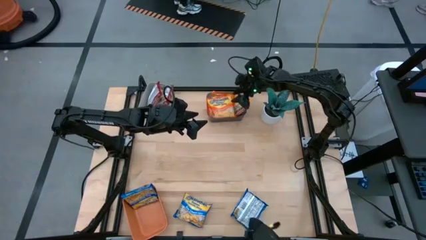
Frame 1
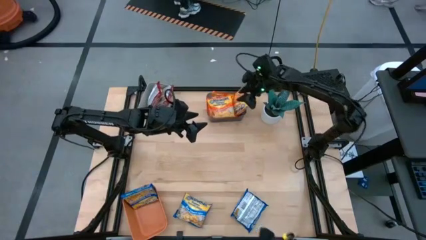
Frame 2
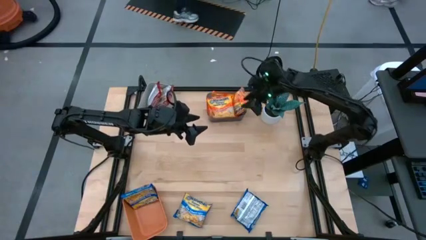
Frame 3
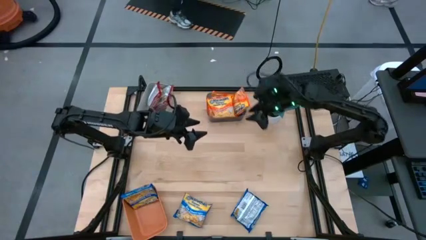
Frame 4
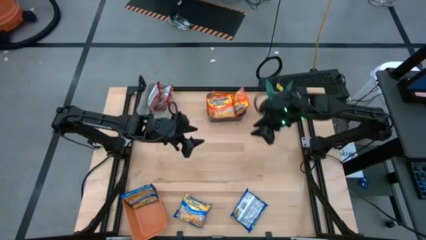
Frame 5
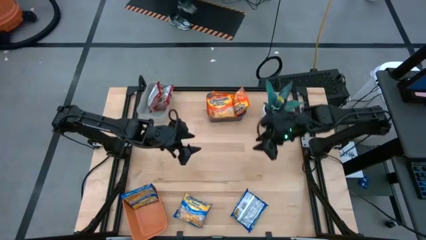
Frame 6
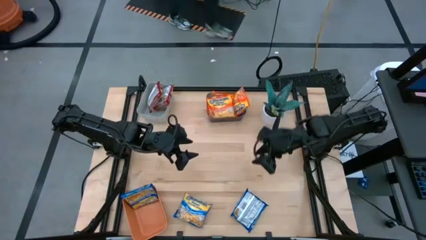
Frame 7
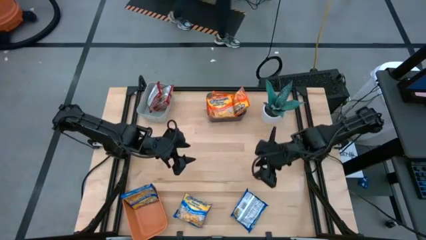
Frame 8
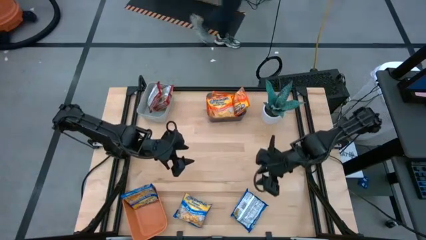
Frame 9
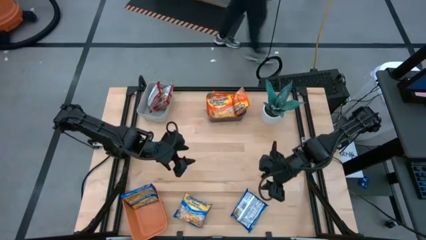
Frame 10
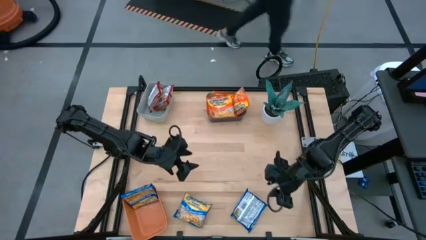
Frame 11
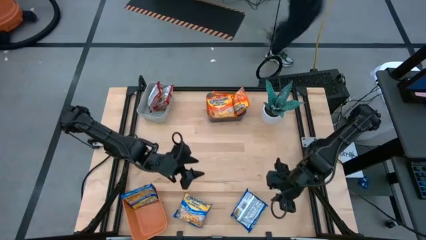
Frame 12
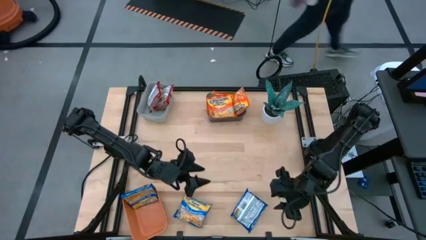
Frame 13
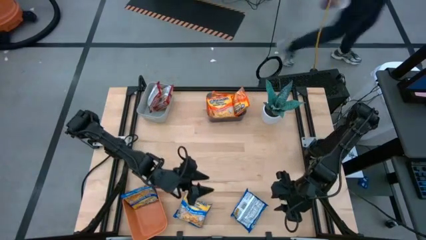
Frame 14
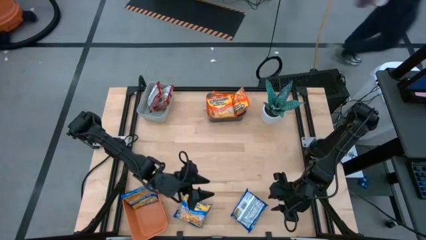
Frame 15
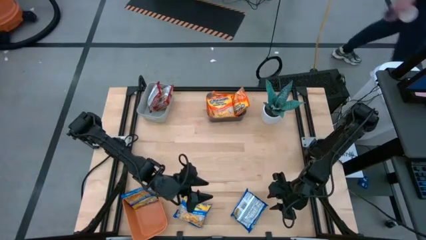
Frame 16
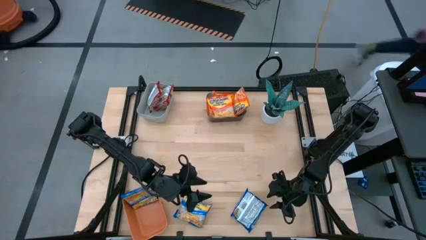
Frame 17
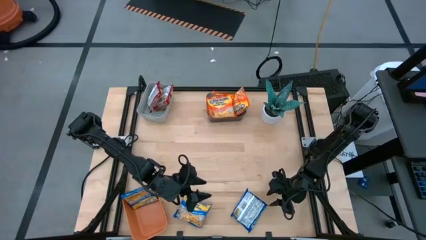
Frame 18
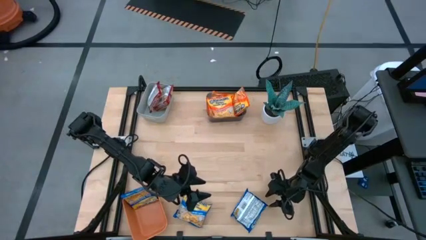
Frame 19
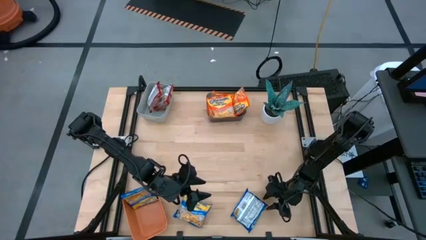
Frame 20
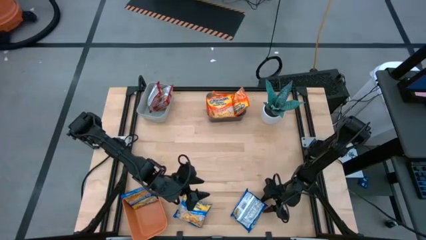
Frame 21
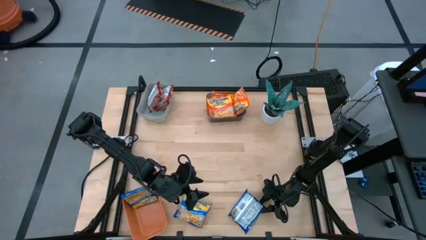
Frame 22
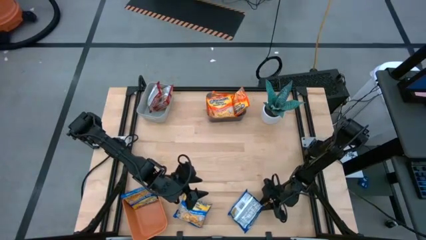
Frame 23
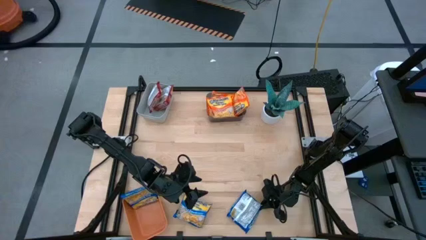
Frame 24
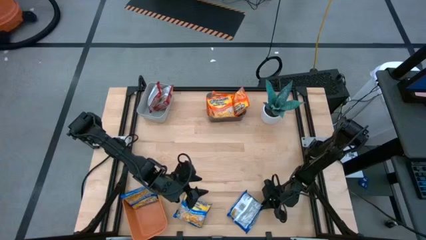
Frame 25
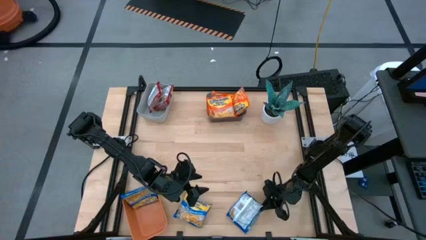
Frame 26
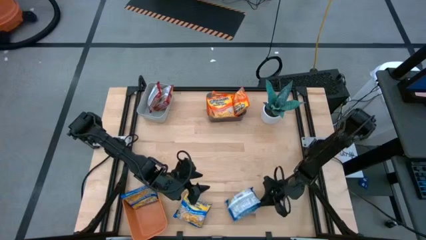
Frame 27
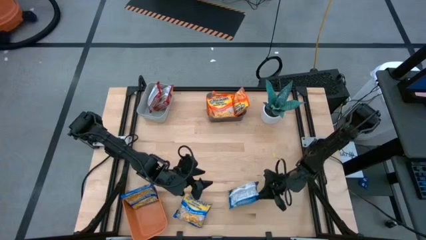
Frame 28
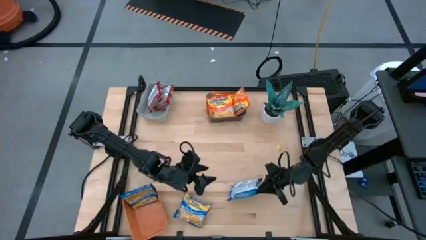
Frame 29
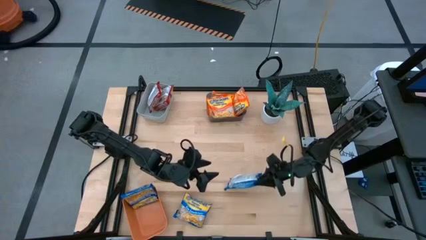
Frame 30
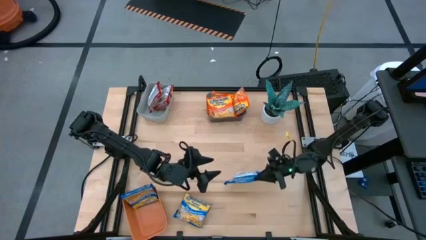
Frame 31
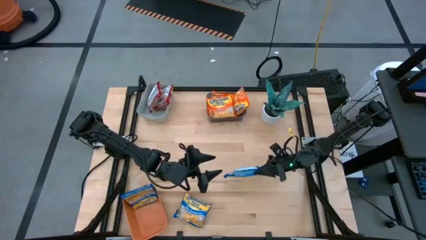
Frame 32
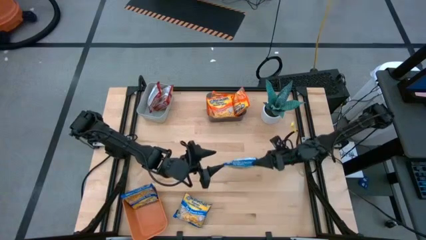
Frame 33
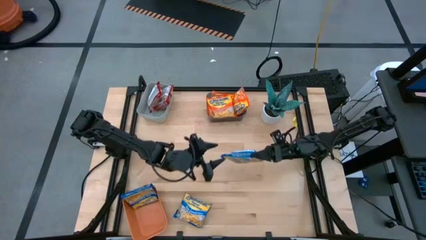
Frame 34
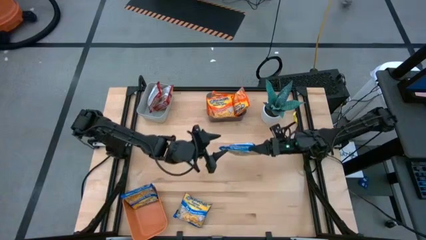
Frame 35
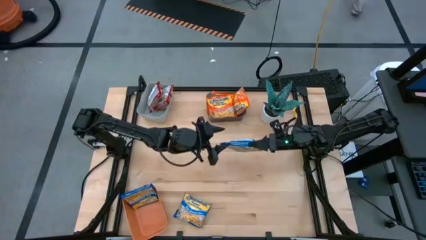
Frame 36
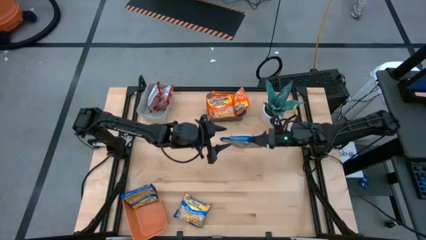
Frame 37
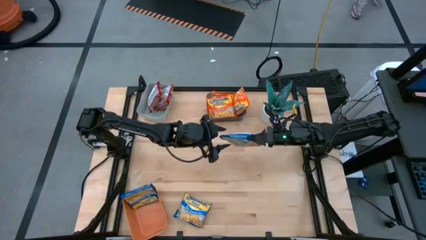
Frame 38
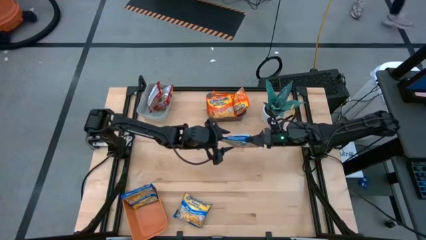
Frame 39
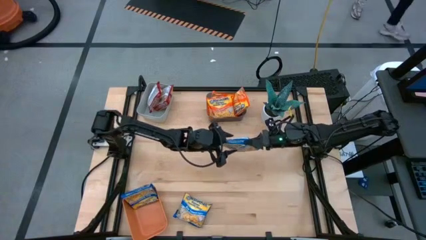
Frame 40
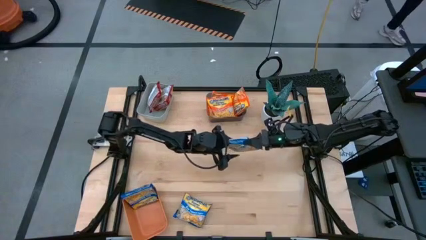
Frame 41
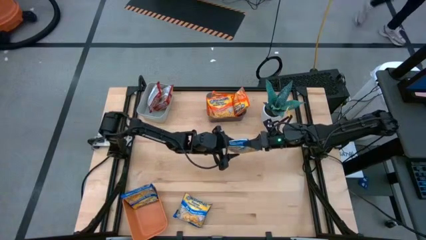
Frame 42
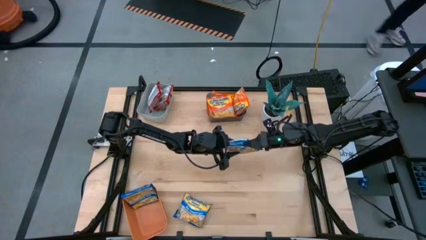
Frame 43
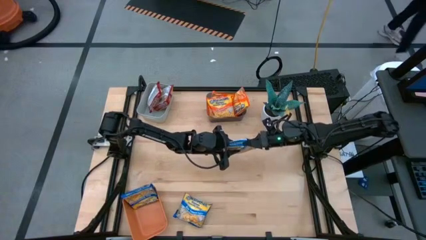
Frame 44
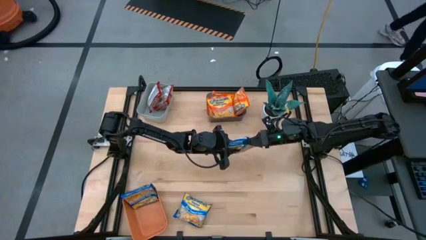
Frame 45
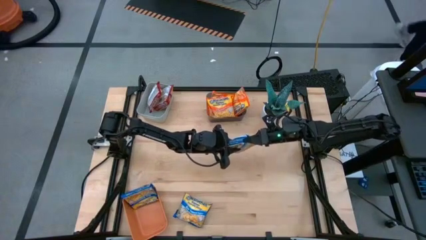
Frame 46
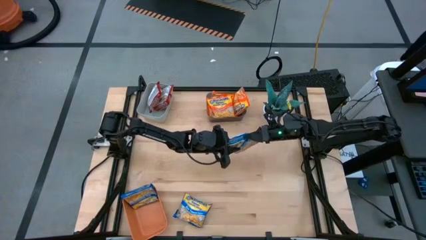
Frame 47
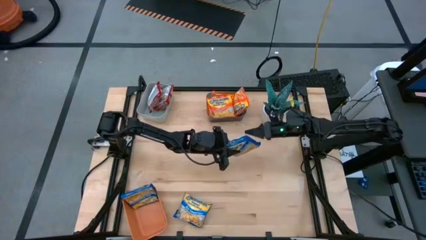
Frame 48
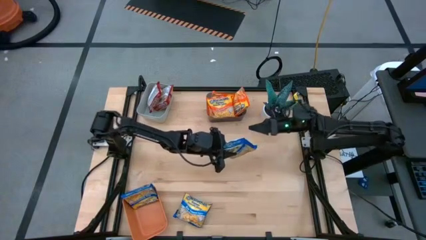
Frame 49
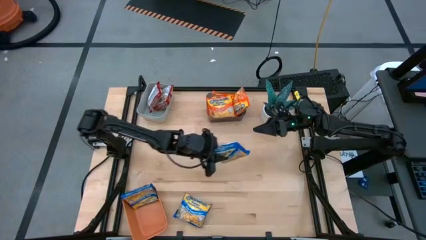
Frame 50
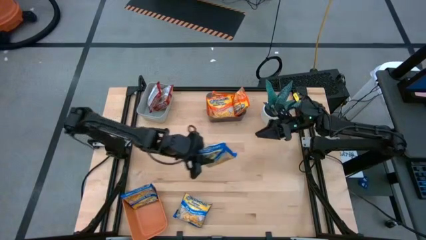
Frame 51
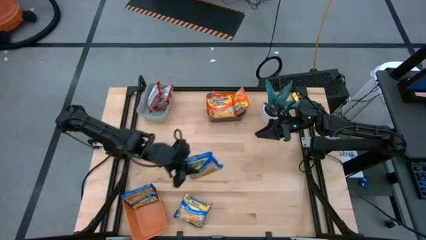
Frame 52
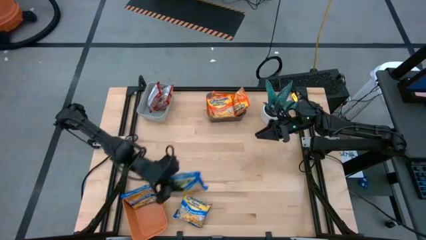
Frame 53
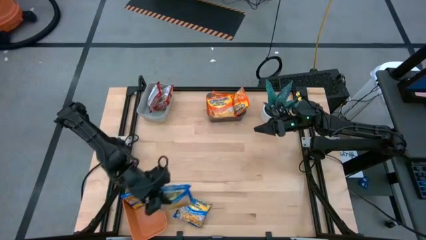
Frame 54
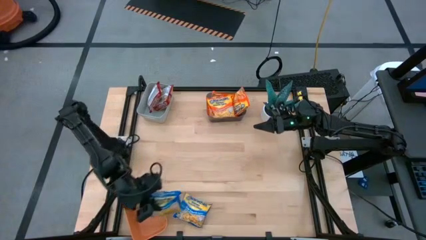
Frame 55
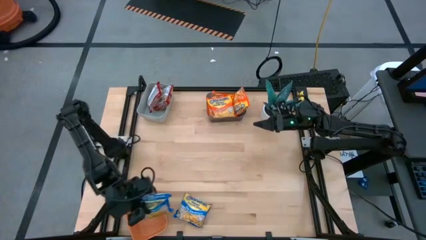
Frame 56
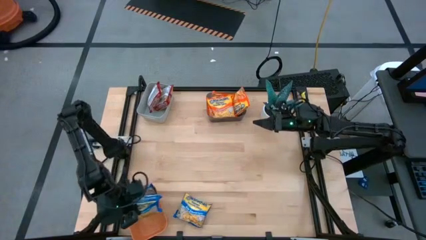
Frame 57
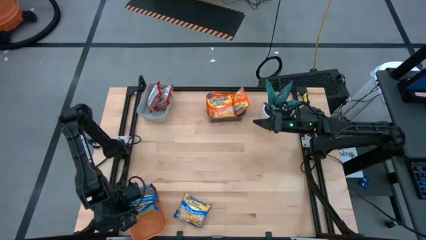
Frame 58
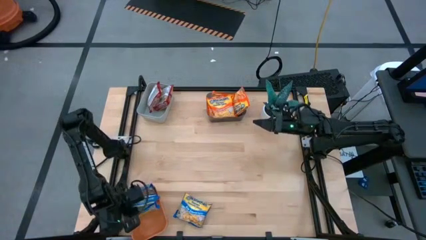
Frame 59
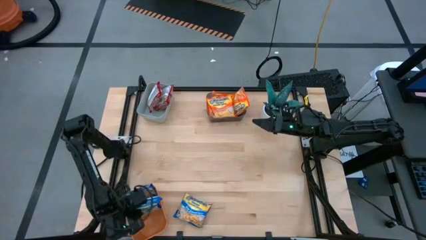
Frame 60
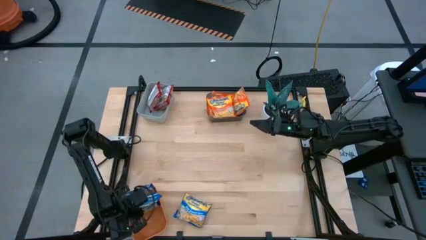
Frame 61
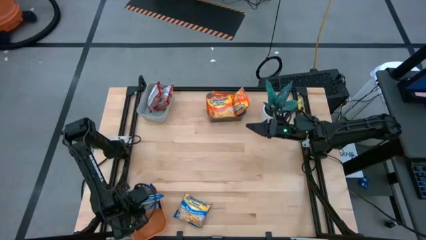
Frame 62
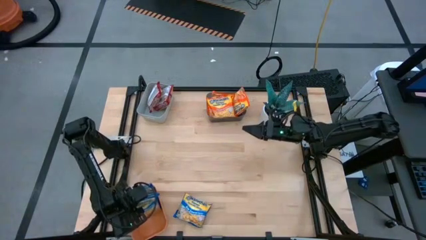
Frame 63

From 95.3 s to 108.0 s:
Task: Sort Maruchan noodles
Put the right blue noodle pack into the orange bin

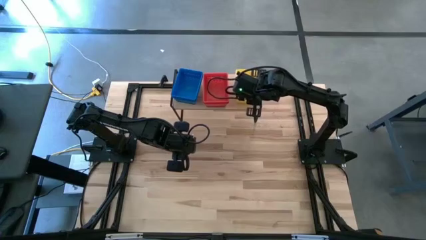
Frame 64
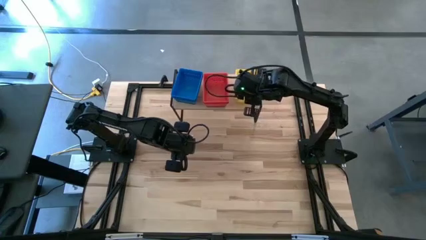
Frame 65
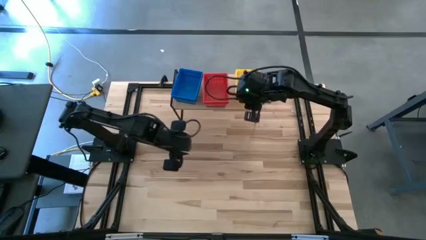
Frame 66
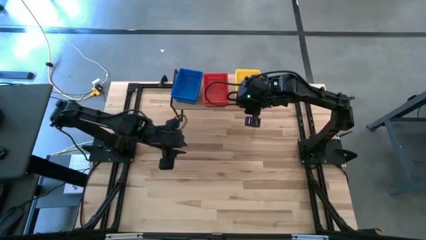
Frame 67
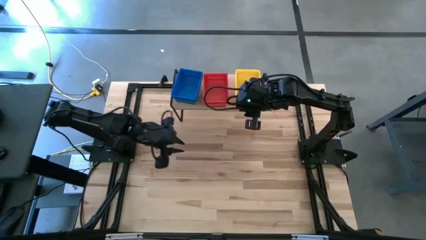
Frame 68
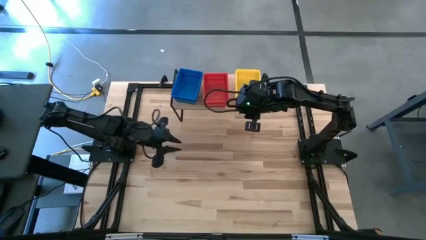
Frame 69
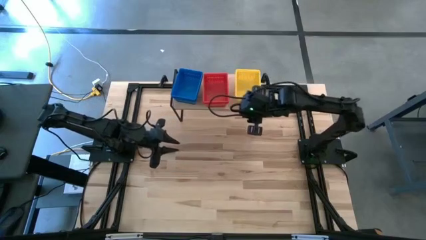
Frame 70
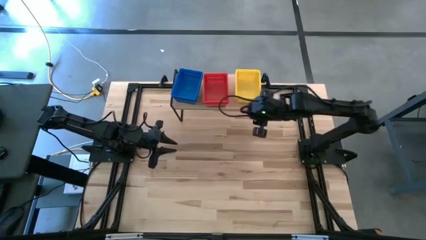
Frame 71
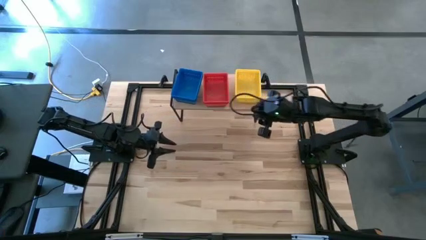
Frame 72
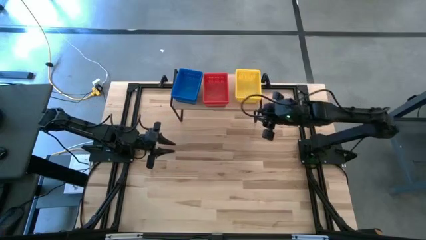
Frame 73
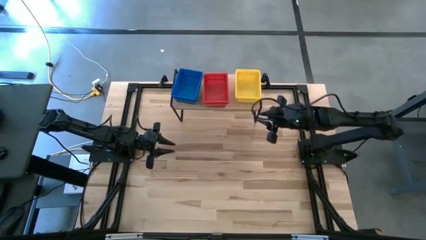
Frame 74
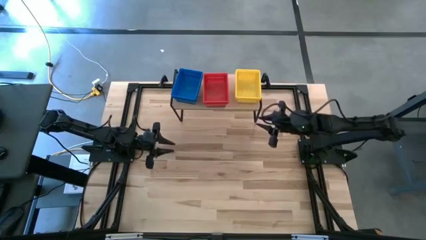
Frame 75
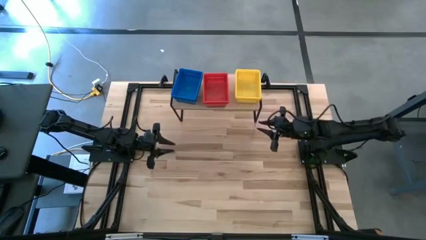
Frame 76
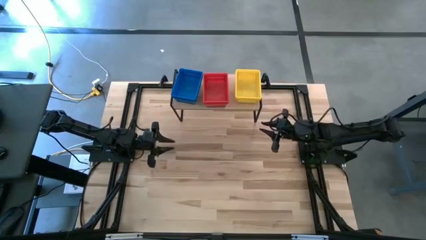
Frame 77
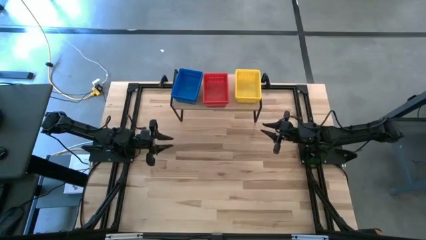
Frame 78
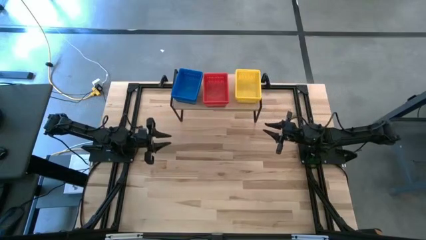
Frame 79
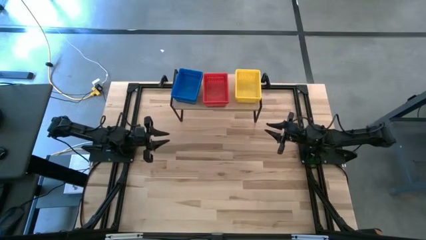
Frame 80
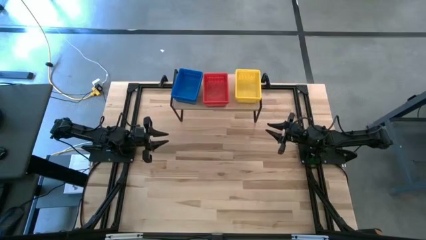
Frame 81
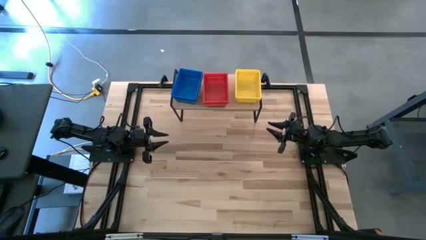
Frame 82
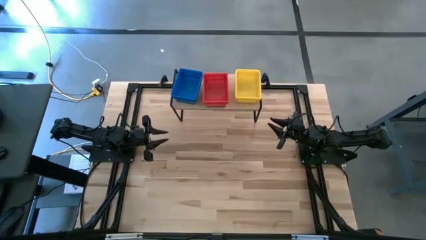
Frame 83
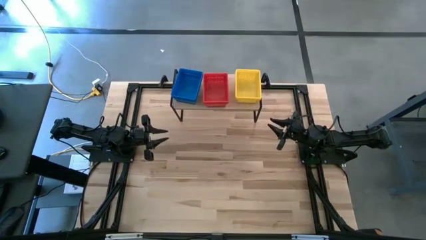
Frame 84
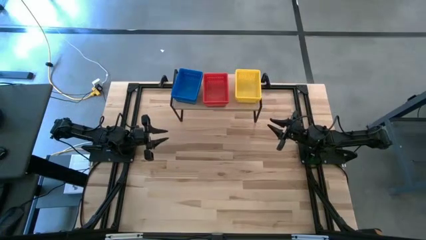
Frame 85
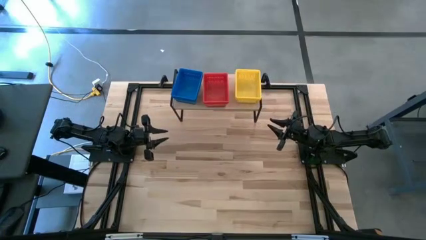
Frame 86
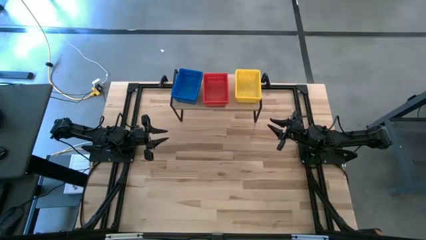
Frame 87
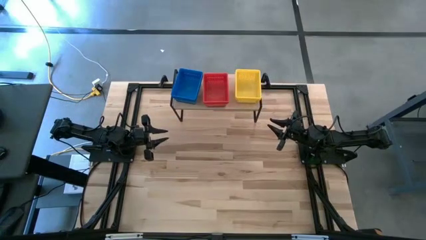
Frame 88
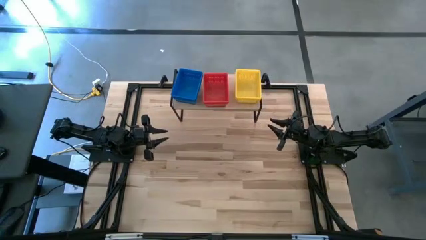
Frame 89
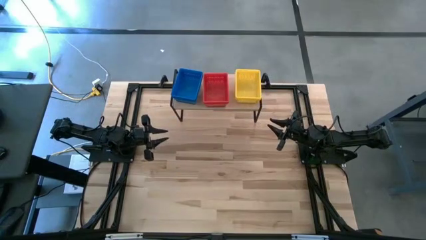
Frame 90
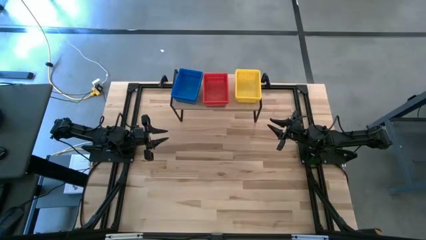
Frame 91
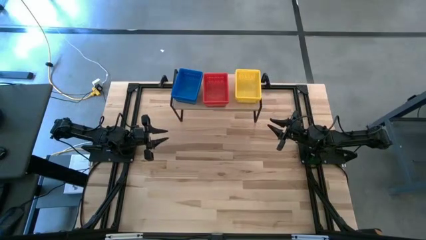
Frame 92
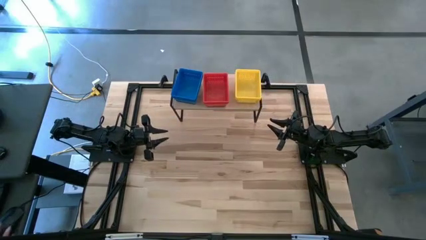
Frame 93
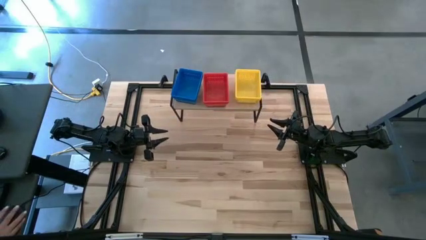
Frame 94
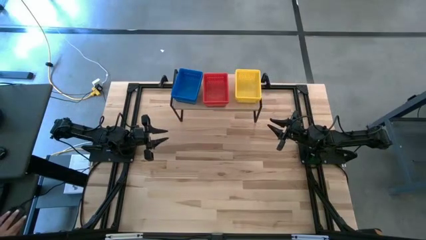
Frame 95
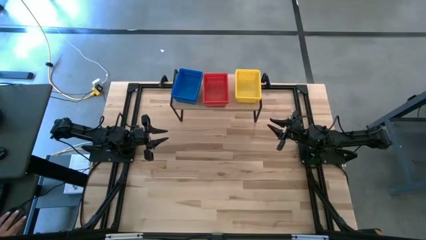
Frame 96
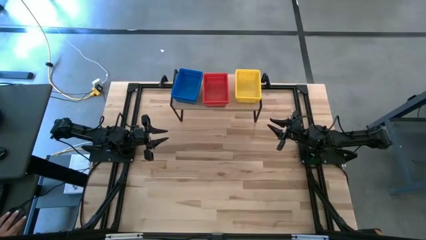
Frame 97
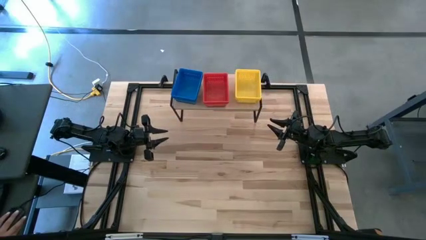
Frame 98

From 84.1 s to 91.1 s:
Task: Stack baskets on shelf by color
Return to Home Position
